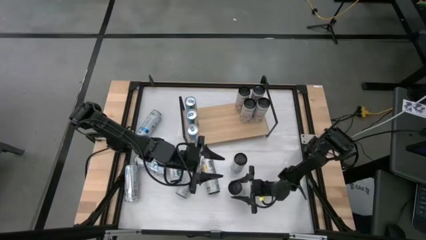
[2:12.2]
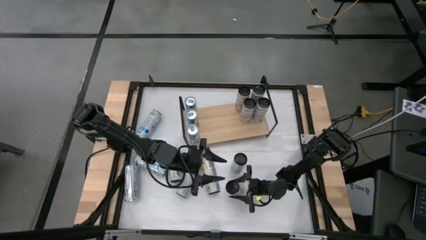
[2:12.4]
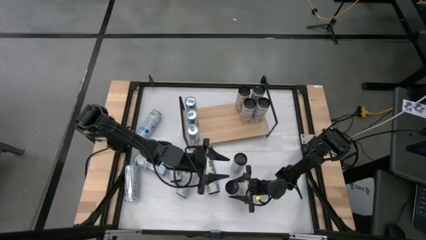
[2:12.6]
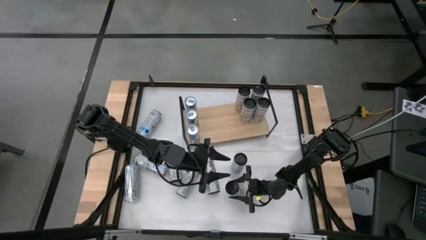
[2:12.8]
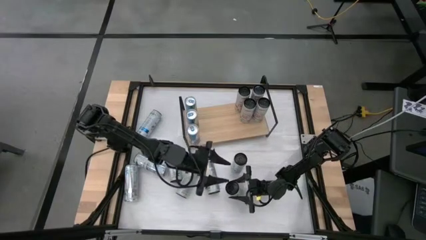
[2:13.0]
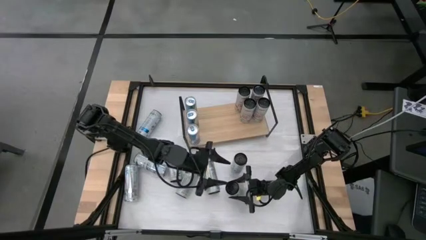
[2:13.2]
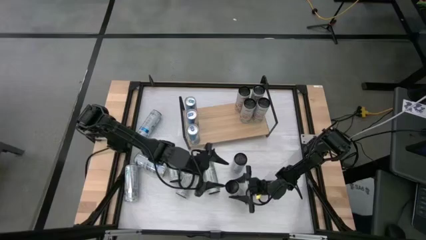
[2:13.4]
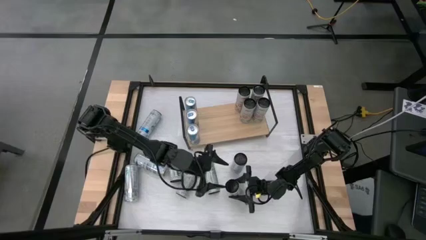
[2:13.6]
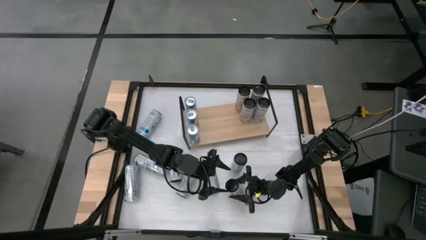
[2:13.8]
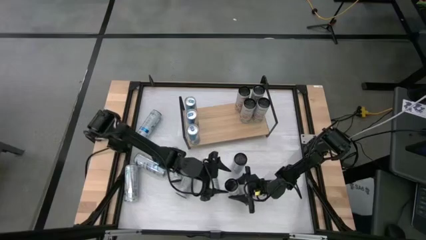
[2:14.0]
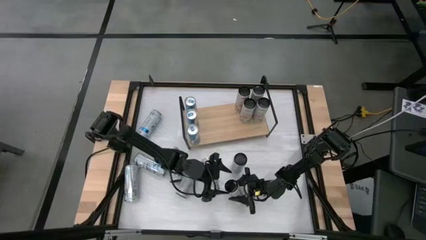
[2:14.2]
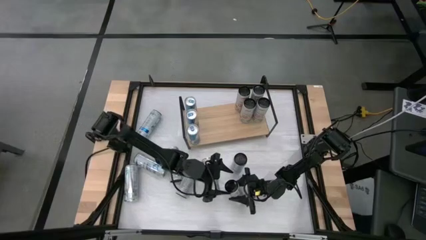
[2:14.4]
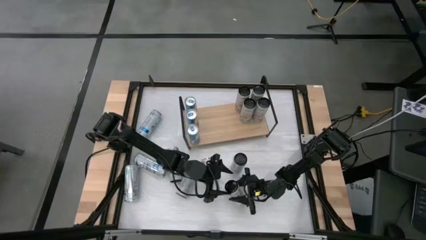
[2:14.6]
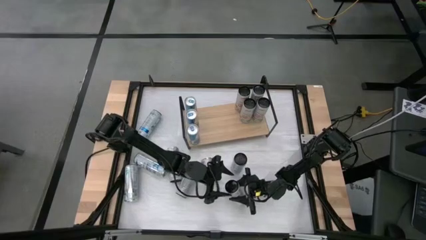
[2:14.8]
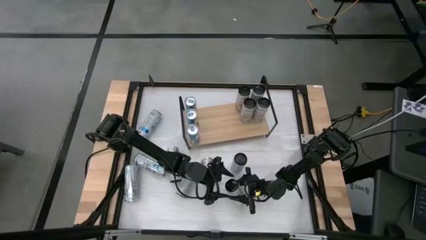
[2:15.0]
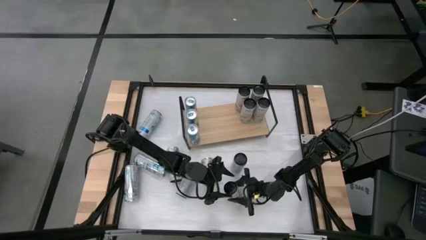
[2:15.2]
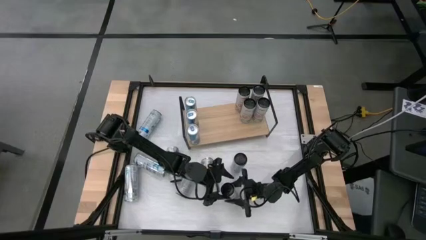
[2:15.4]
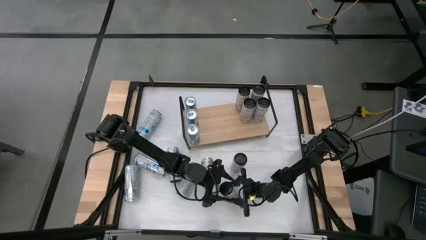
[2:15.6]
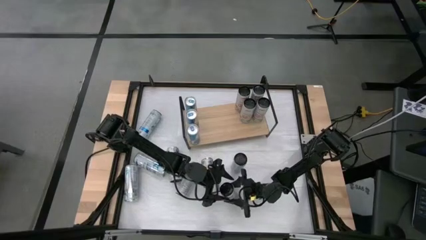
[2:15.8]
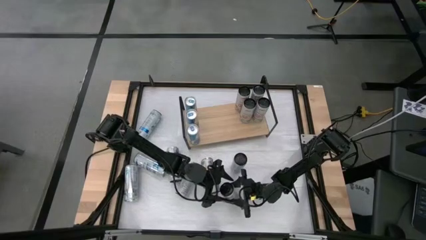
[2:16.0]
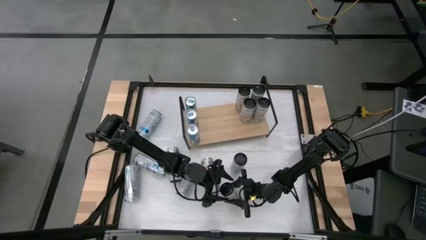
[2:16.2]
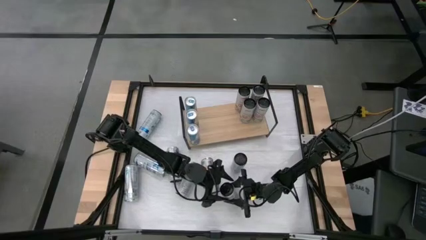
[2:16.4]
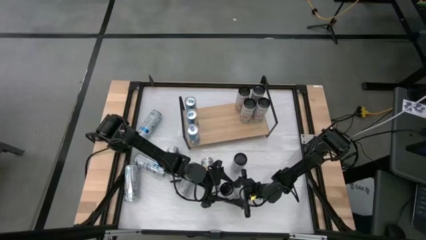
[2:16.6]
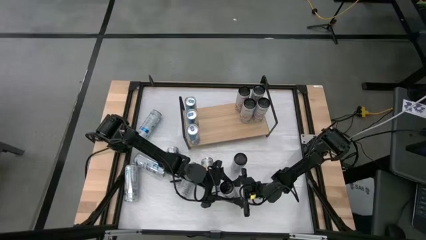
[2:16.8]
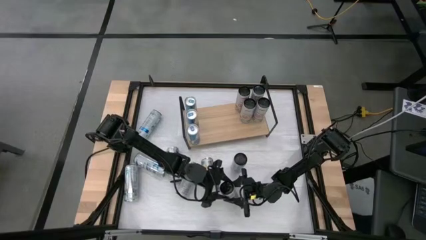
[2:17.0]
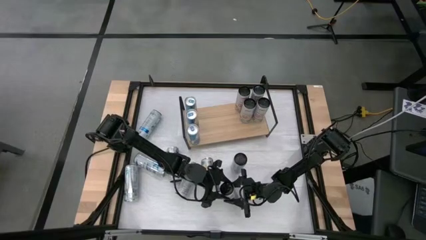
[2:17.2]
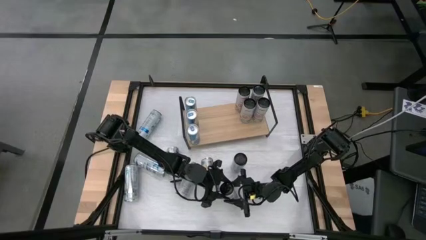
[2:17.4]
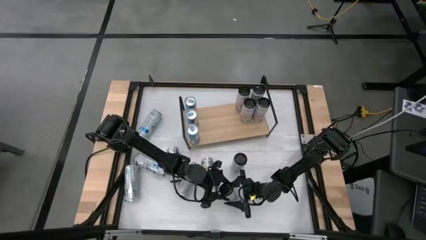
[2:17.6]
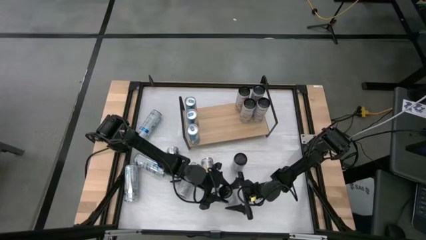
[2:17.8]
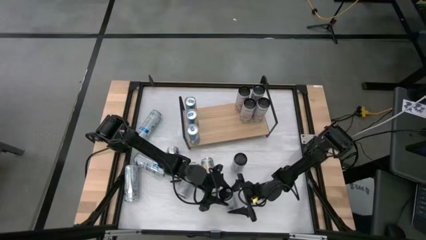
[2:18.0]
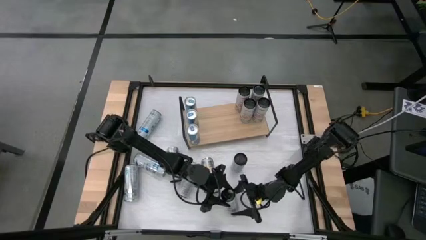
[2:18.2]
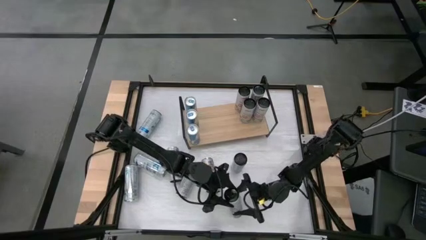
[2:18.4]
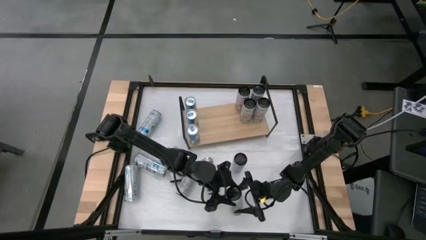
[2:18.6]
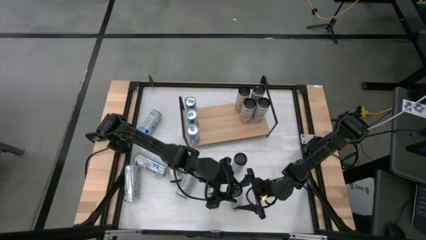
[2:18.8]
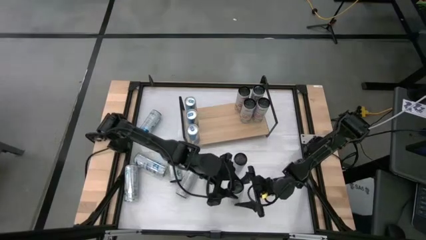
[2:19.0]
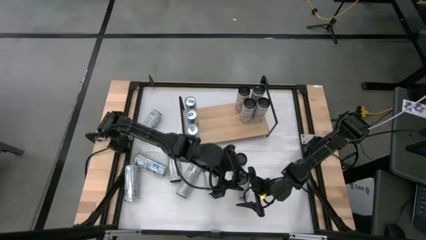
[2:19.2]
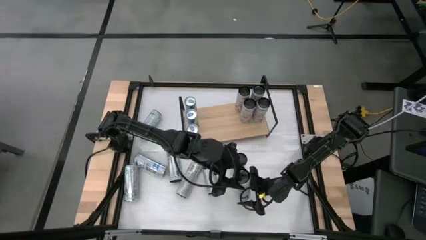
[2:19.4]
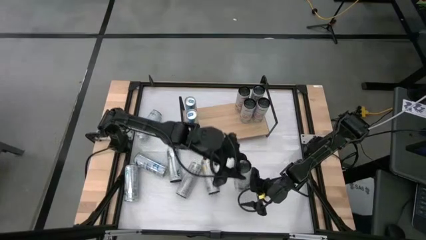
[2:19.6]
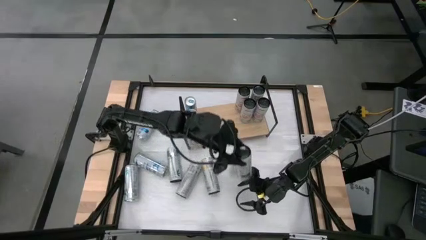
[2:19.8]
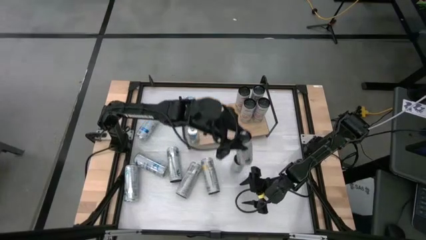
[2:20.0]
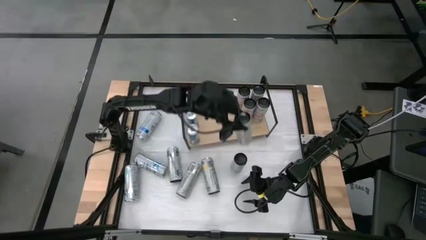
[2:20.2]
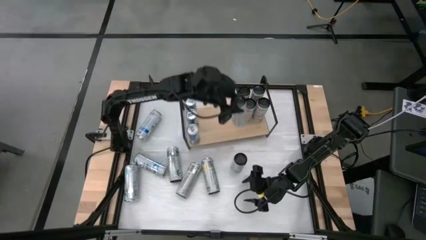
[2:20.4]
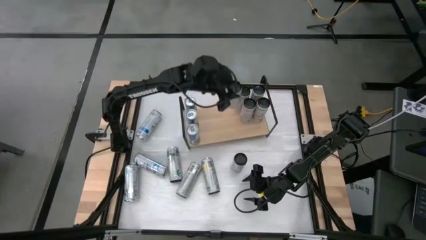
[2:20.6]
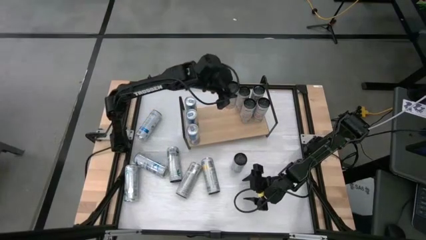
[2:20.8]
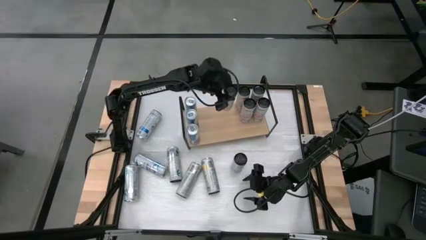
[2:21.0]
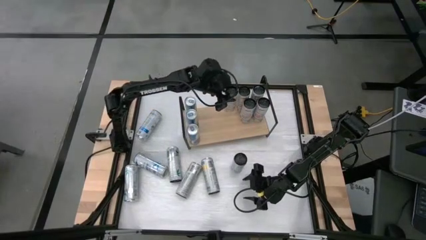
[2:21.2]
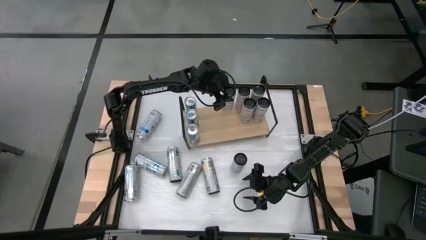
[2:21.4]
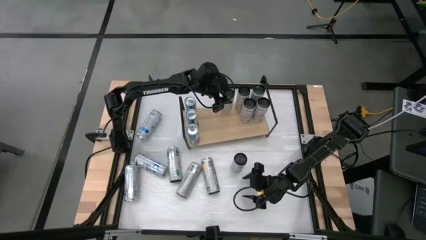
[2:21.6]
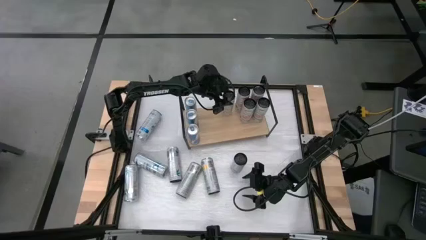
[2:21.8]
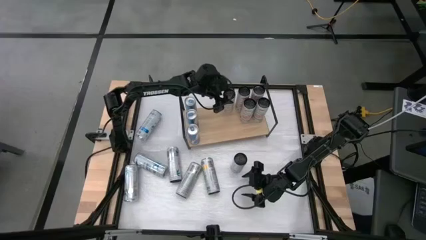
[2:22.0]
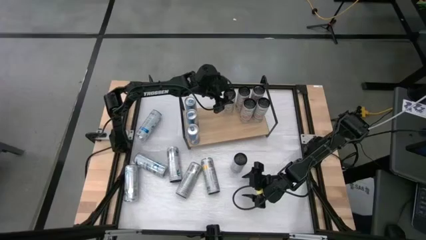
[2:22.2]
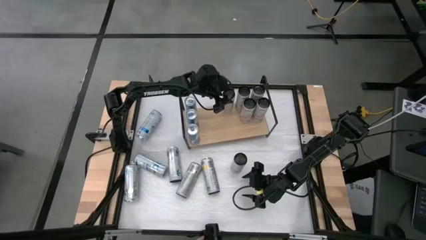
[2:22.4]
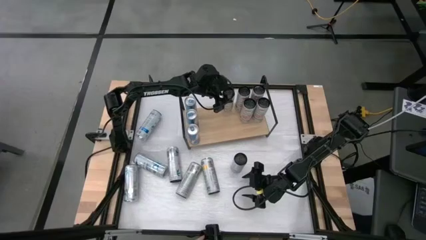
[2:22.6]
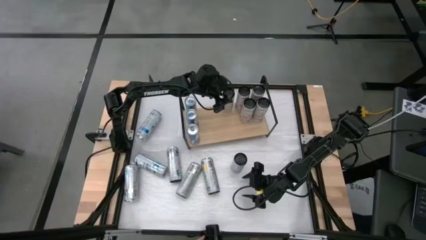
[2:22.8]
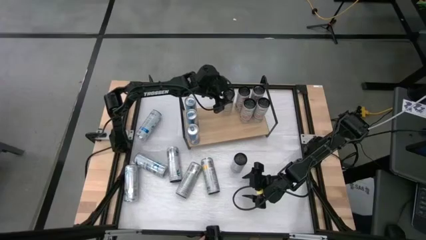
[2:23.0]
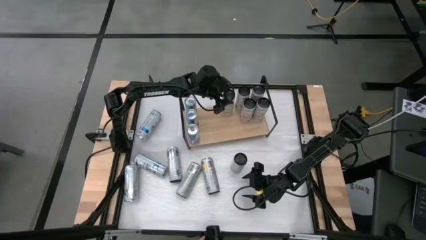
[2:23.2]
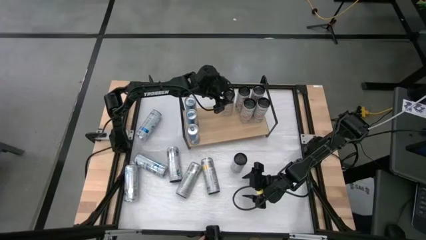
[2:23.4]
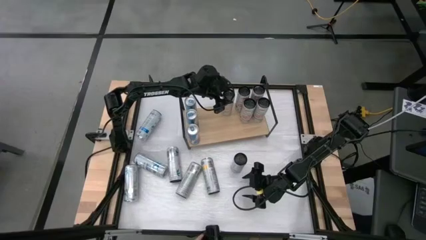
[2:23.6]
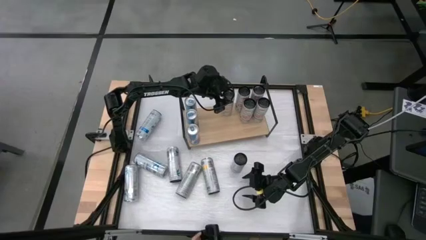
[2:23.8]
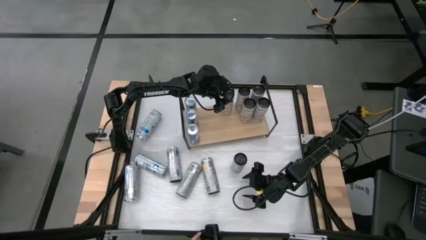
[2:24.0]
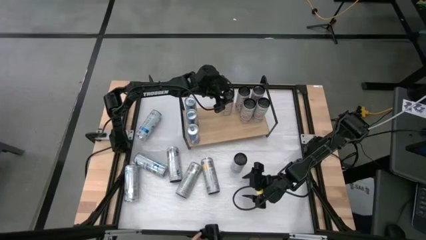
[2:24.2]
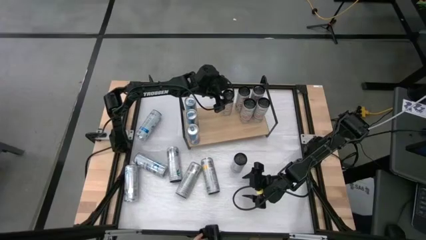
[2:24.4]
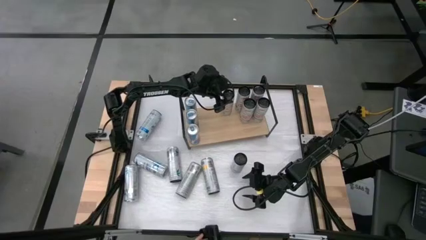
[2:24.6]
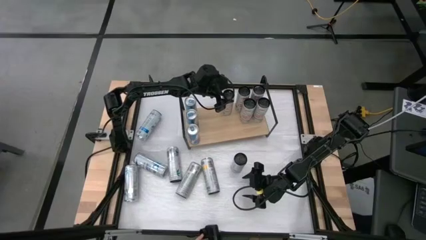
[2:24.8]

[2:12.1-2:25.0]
Task: Place canned beverage on shelf
Put the white-yellow soda can on the shelf

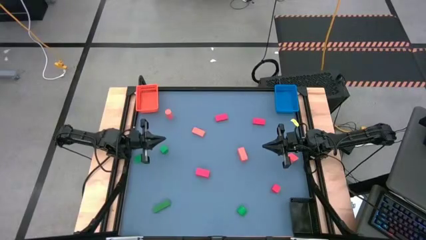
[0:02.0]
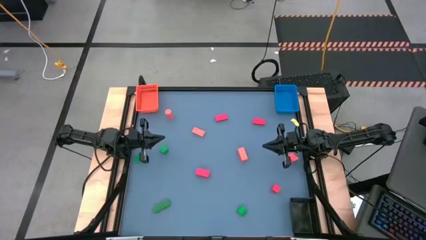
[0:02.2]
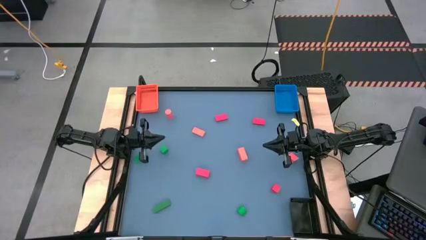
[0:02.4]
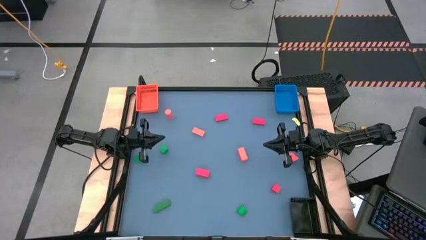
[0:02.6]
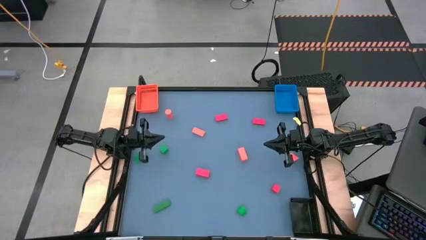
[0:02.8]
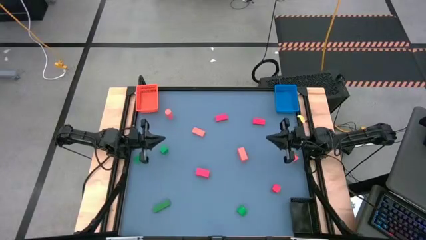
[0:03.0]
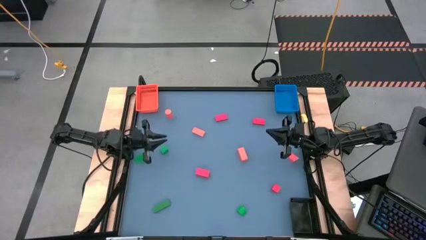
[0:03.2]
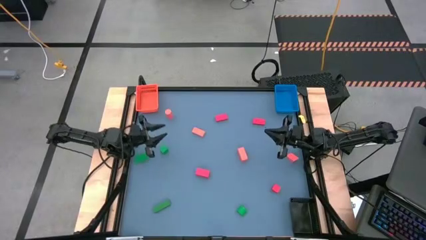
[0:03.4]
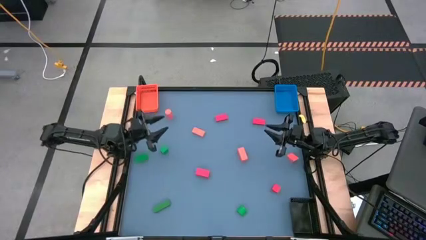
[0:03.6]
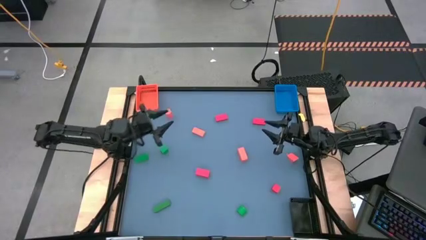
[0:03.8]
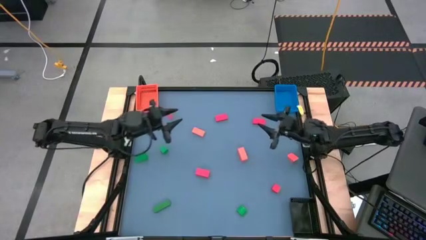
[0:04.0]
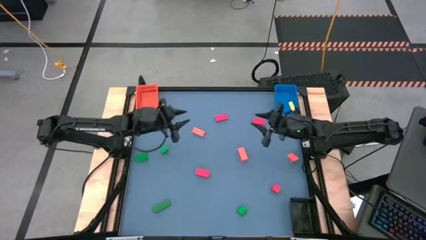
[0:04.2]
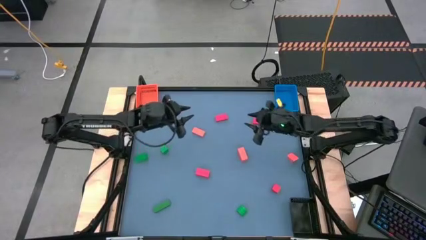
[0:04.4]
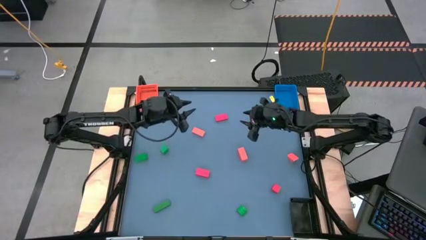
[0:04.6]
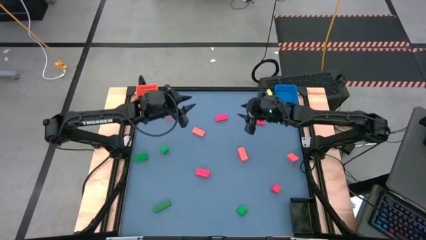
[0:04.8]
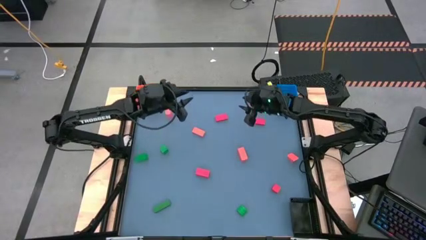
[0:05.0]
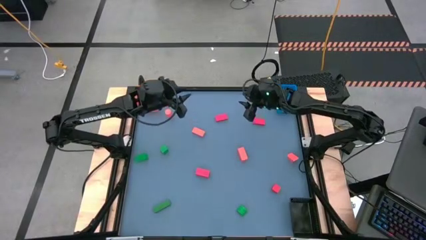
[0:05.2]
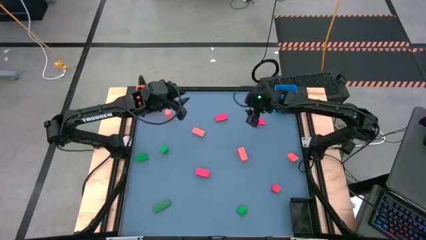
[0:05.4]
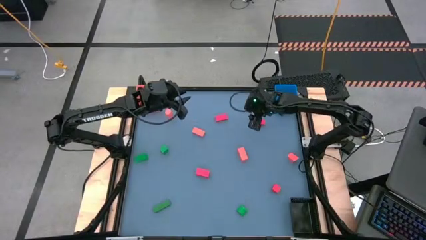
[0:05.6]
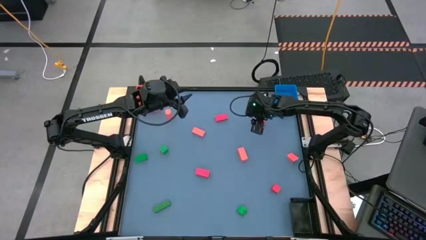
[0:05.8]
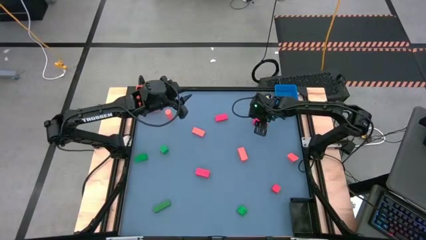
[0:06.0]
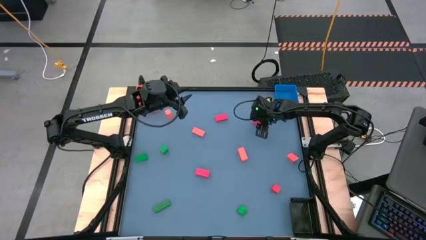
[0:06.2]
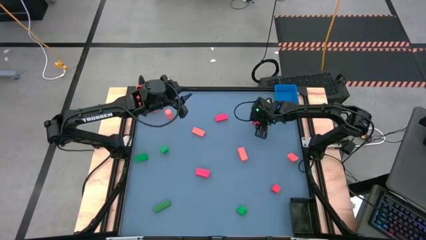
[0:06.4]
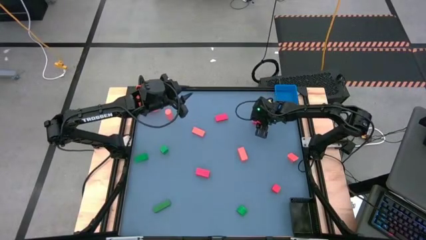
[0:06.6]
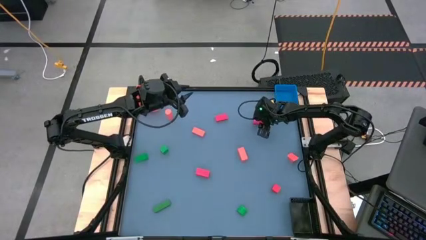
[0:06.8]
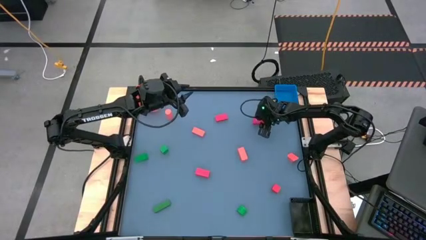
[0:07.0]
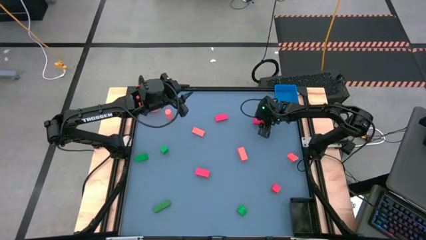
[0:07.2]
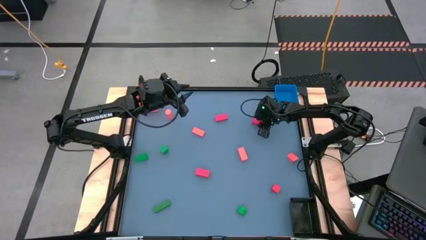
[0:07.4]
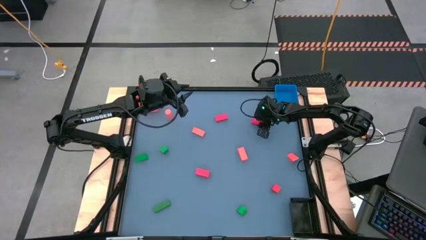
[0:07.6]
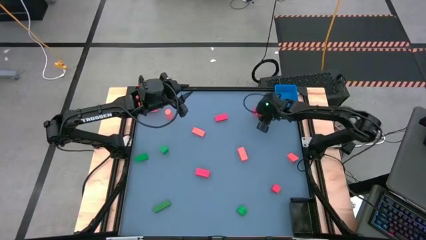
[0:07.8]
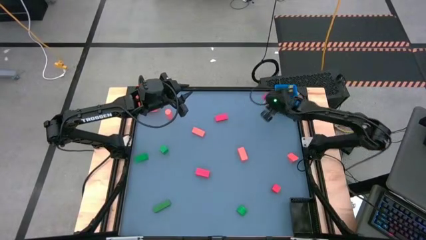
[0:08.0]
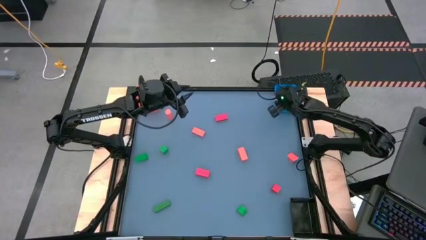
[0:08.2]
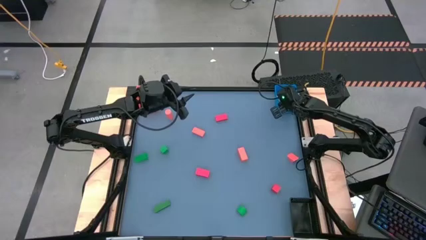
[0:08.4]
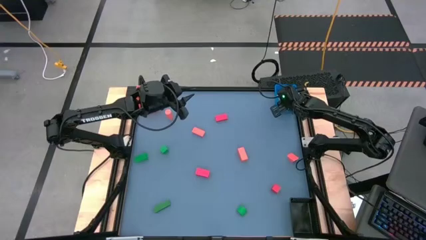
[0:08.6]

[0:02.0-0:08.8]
Task: Sort & place blocks by color
Put the pink block into the blue bin
